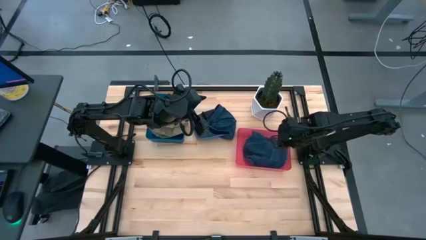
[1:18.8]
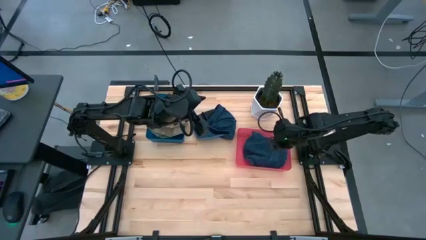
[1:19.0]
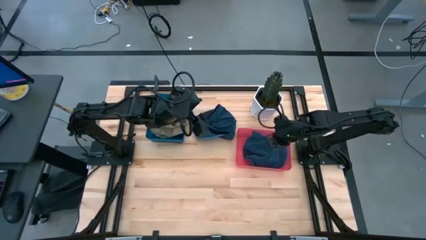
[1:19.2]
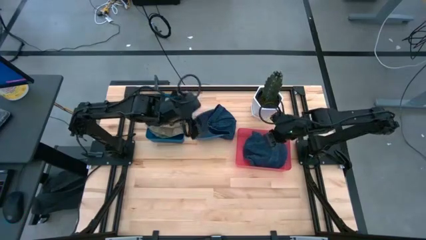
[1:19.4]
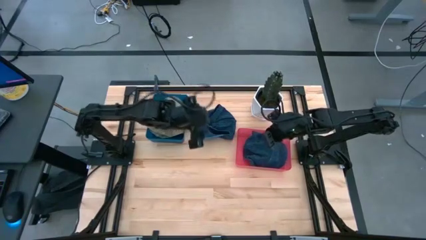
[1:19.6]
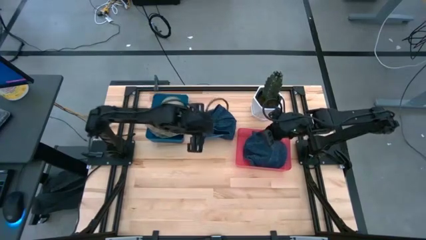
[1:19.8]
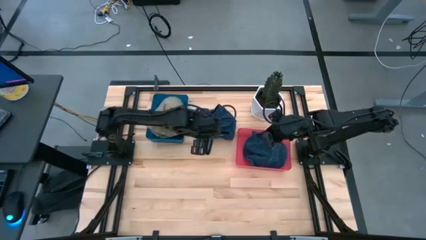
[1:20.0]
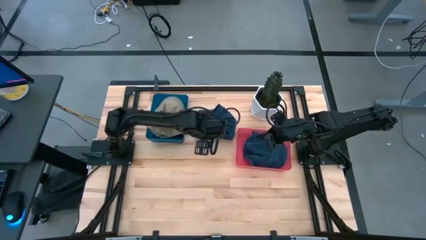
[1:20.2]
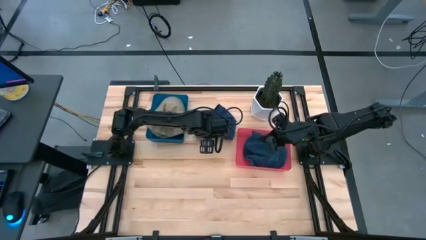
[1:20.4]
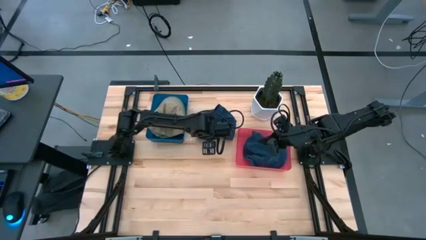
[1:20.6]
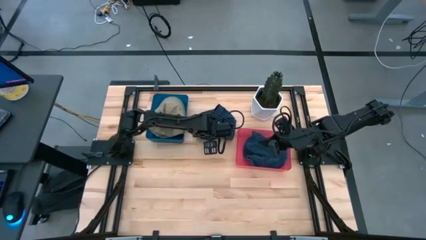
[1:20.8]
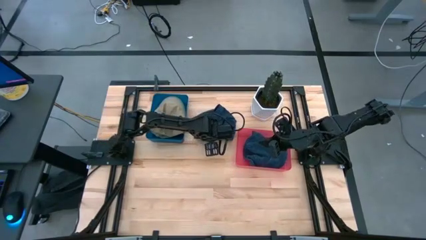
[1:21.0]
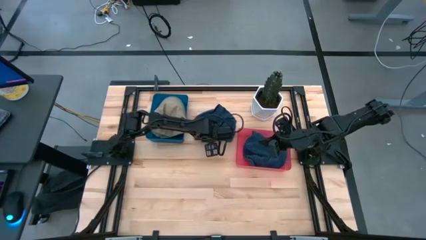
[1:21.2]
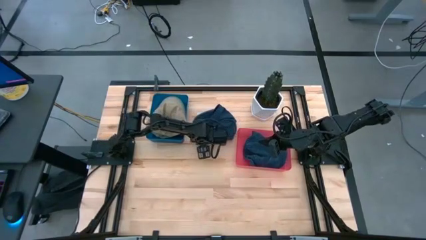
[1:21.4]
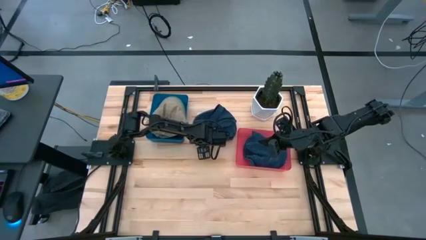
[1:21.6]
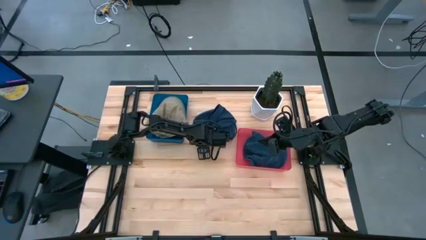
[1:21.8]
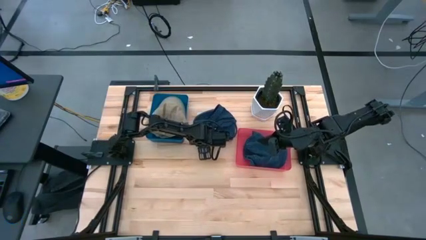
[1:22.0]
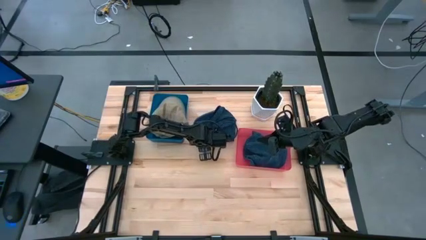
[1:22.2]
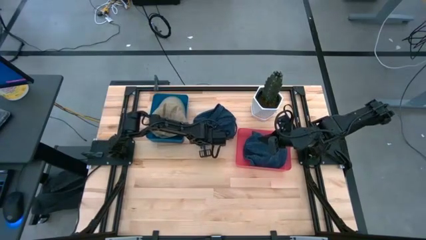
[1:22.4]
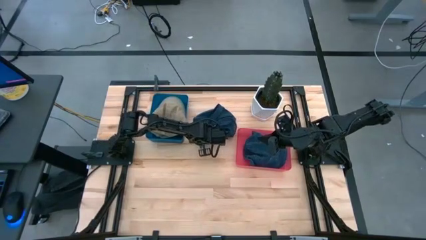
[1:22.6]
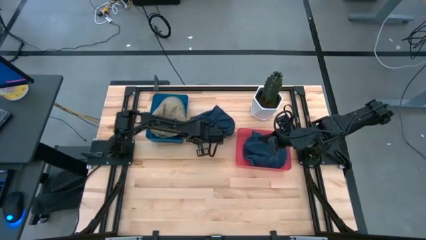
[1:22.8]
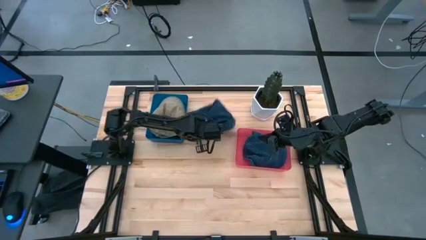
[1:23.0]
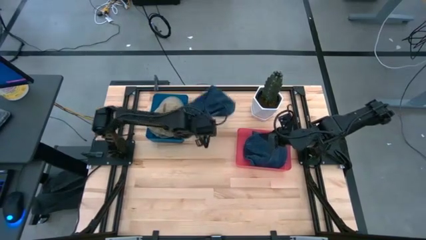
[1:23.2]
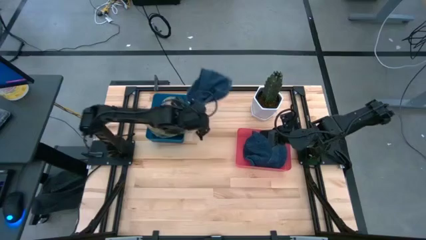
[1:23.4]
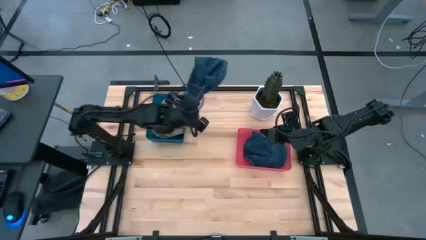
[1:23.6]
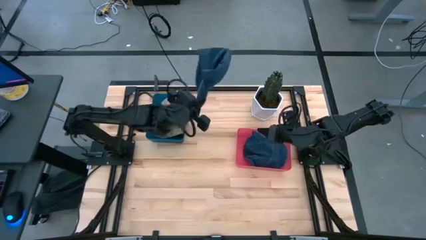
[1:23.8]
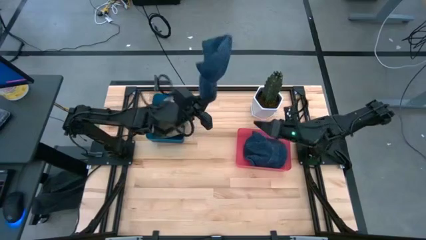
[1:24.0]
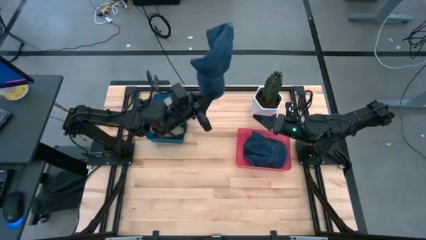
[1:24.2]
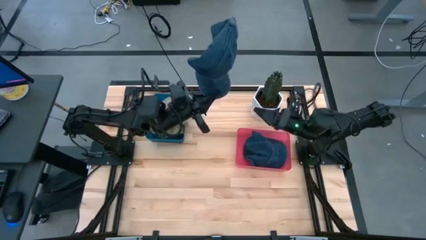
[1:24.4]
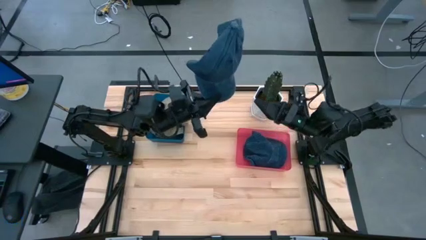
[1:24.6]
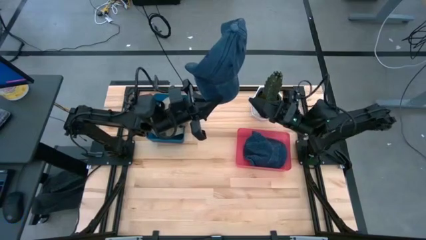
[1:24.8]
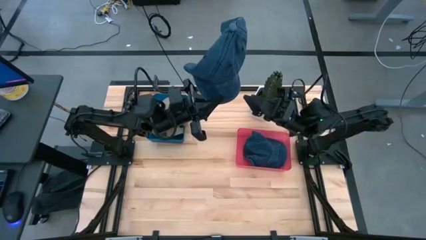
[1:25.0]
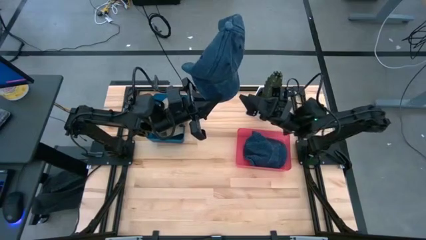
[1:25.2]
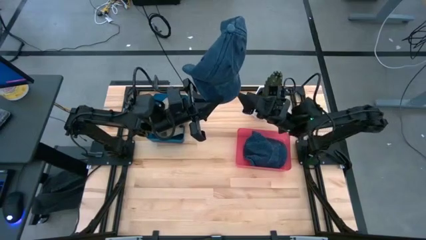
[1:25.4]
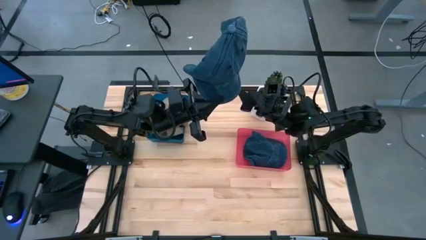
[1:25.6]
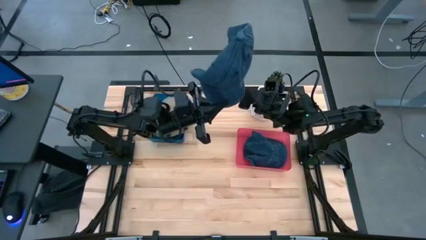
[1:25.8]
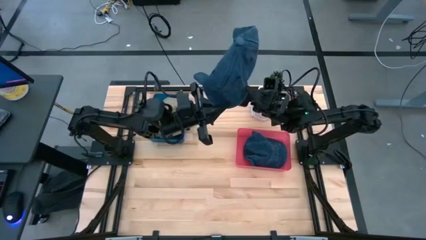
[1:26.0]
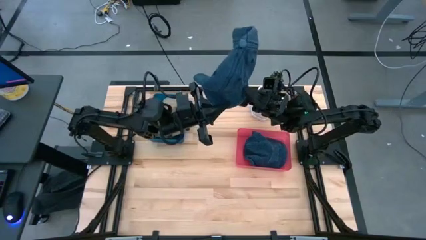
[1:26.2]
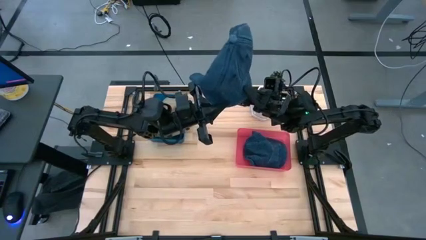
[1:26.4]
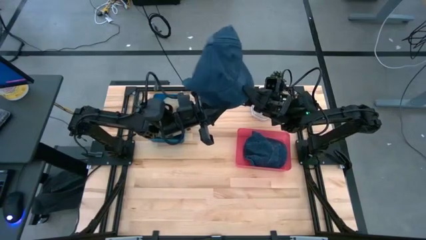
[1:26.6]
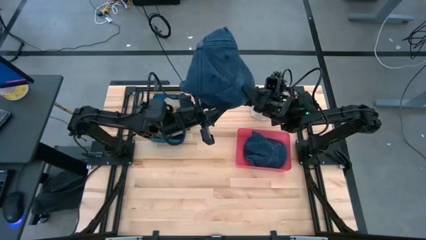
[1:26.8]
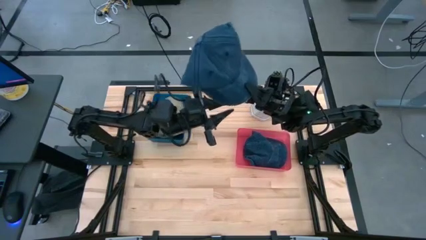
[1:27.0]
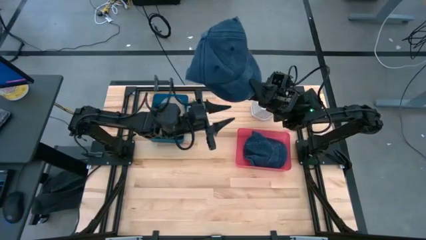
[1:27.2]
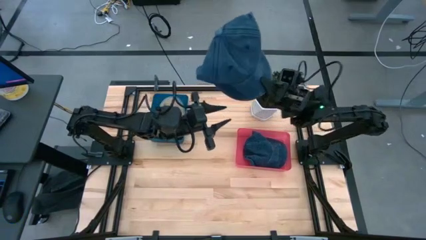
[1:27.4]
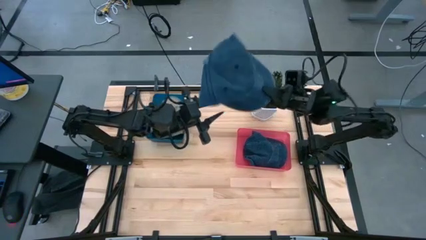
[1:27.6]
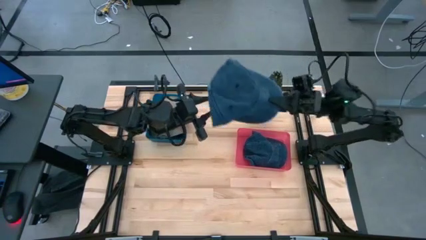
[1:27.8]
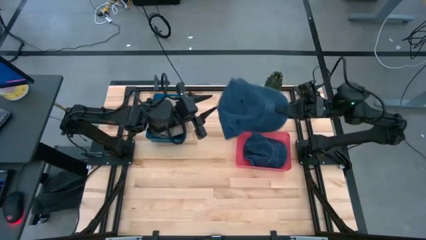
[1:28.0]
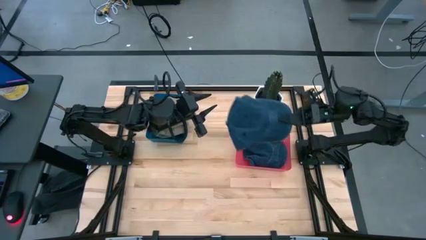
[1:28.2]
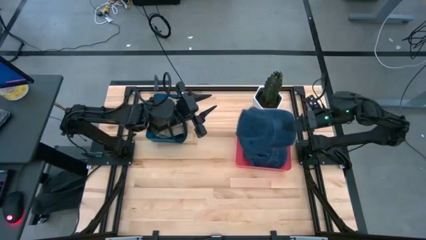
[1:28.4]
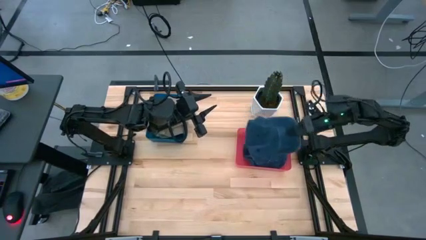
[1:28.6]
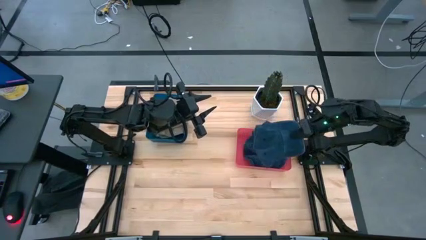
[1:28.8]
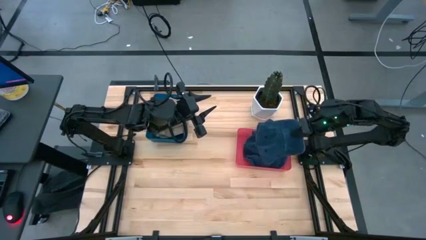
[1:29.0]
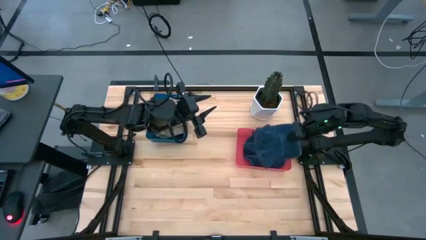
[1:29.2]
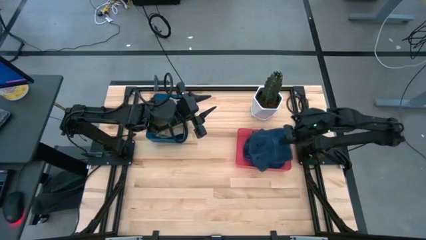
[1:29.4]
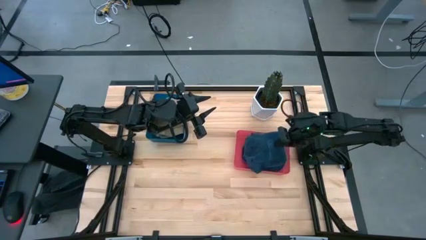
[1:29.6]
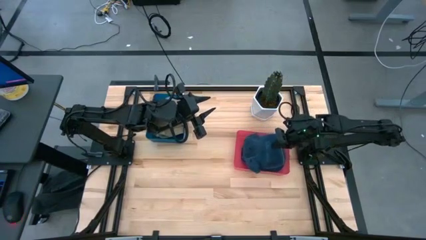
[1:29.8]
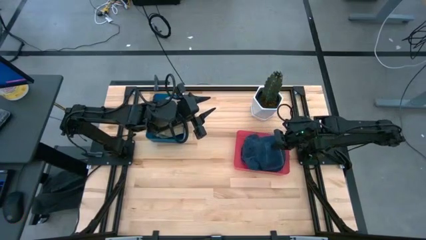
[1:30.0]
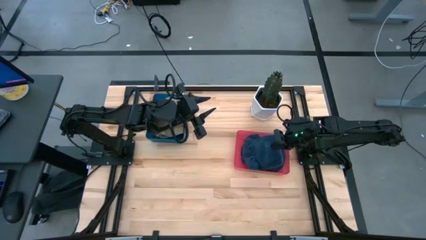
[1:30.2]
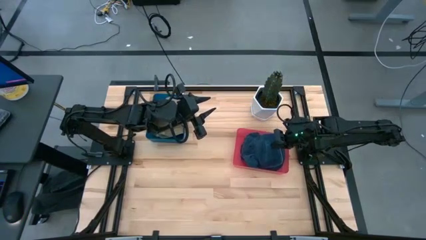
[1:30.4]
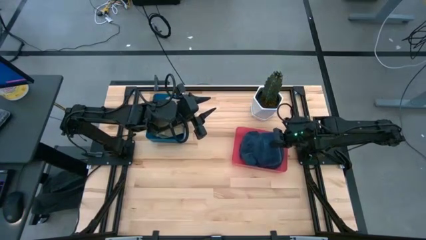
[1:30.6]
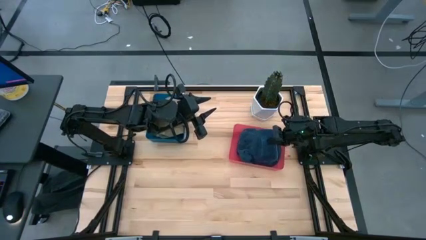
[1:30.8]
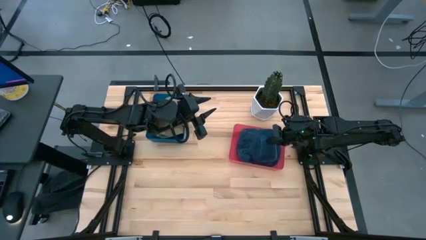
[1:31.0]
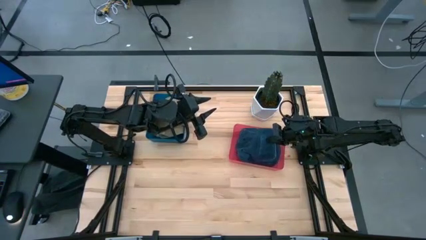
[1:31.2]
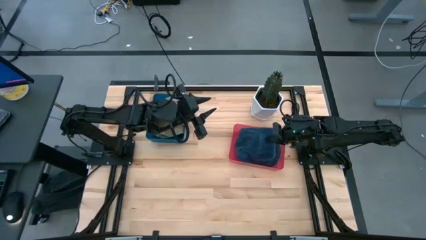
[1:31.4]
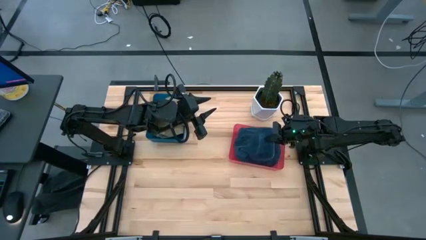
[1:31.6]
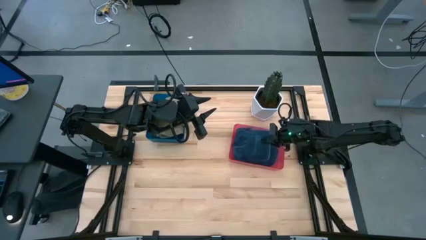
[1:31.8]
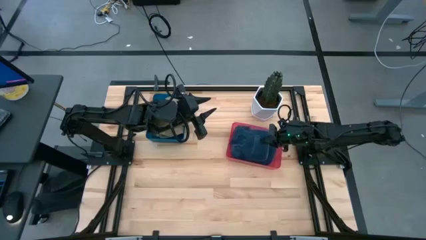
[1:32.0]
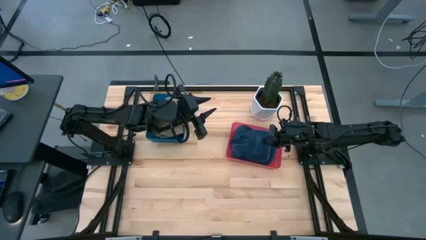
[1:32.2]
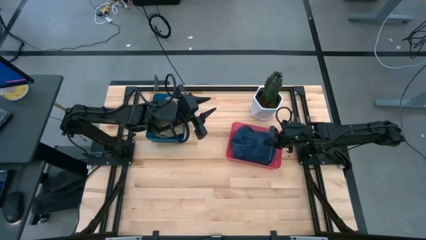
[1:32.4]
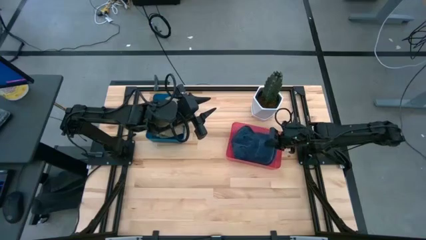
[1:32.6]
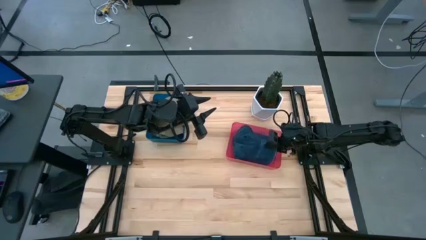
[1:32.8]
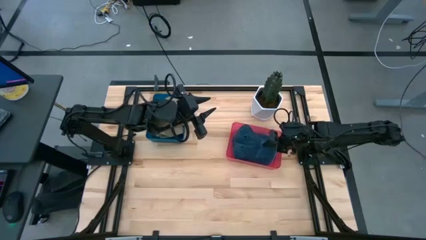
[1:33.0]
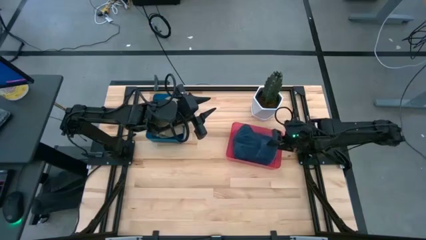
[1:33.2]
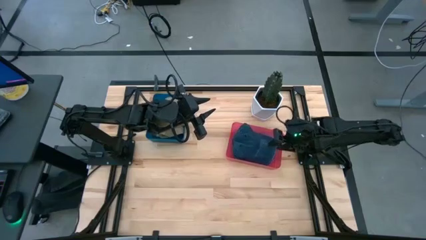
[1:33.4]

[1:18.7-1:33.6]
Task: Pick & Place hat
Put the blue cap into the red bin
